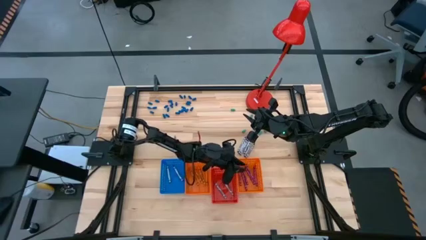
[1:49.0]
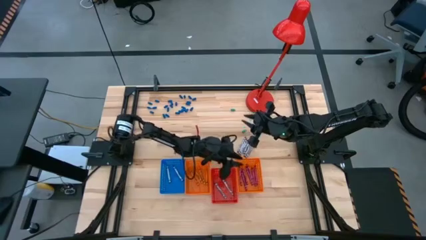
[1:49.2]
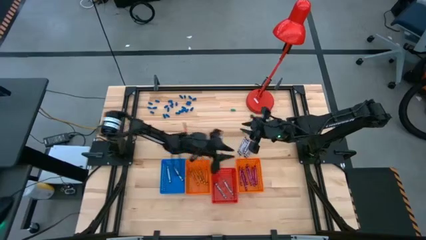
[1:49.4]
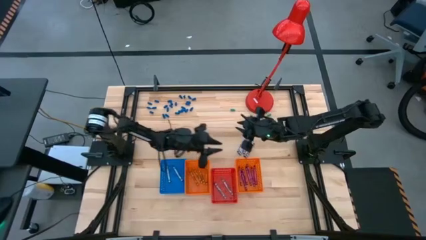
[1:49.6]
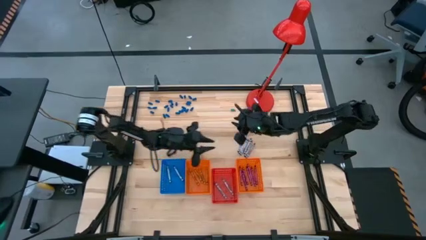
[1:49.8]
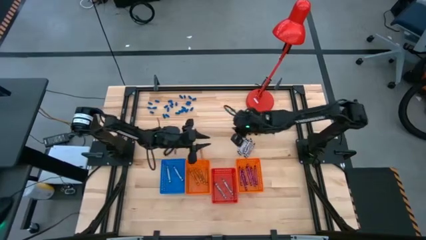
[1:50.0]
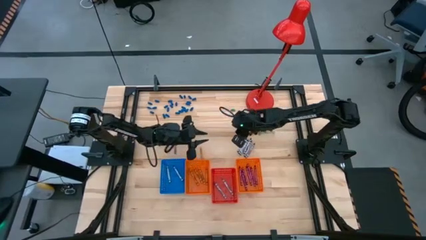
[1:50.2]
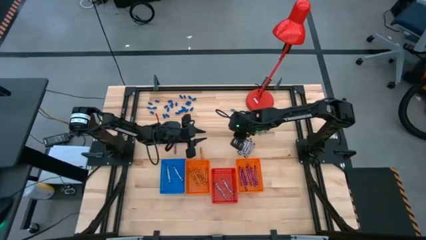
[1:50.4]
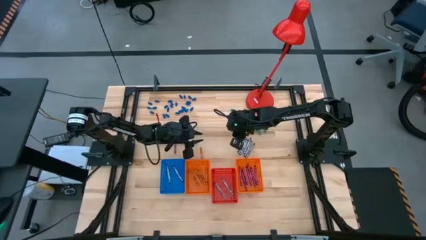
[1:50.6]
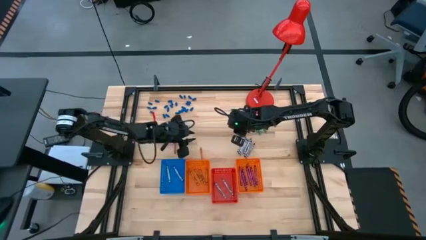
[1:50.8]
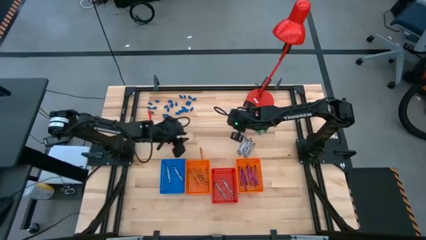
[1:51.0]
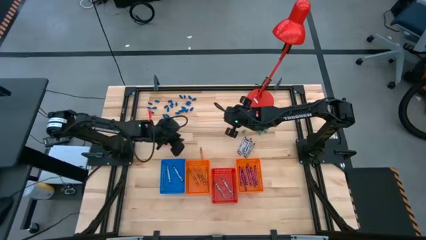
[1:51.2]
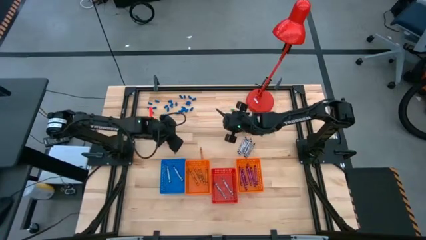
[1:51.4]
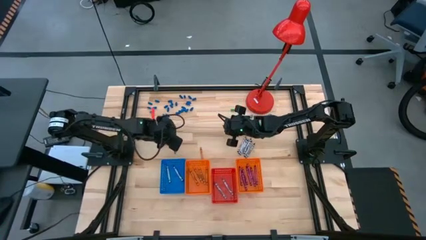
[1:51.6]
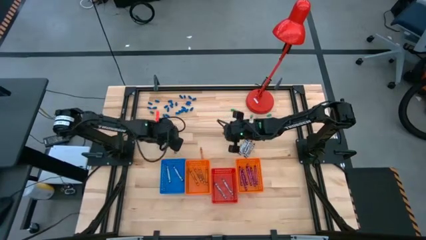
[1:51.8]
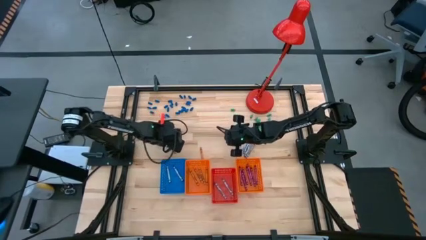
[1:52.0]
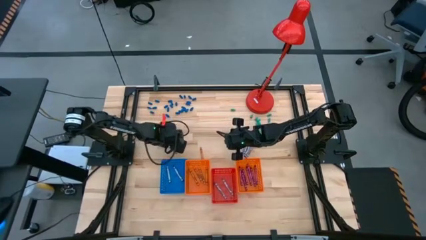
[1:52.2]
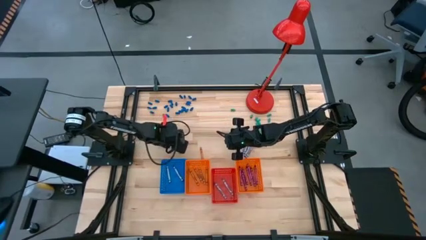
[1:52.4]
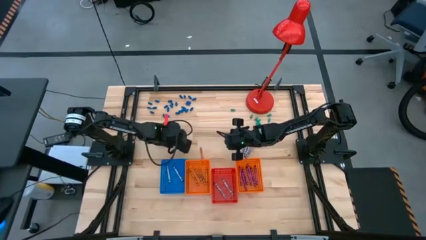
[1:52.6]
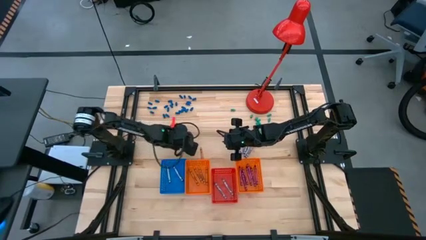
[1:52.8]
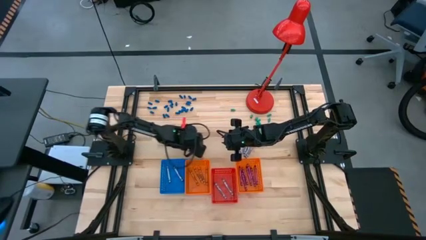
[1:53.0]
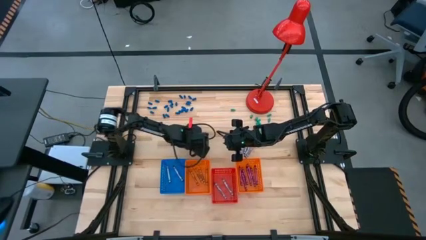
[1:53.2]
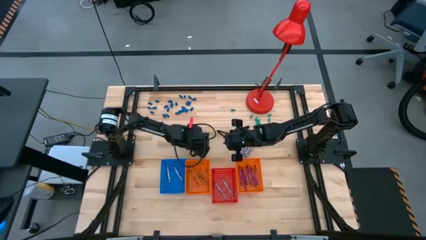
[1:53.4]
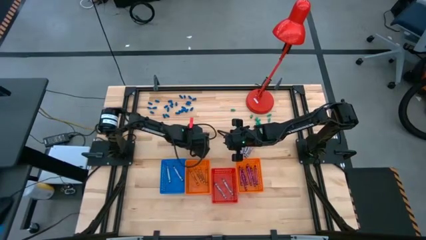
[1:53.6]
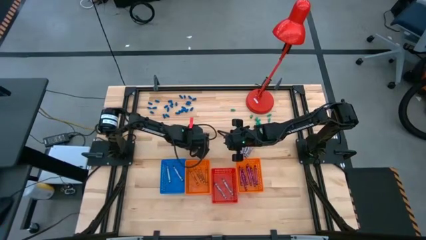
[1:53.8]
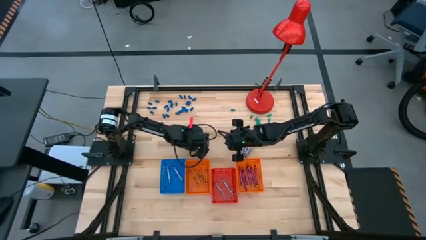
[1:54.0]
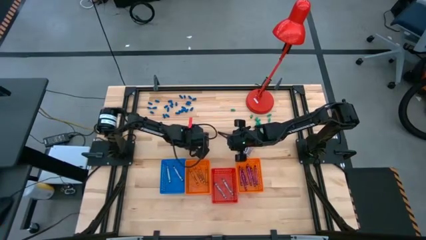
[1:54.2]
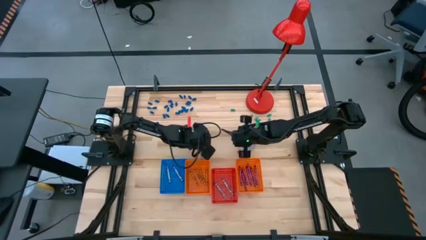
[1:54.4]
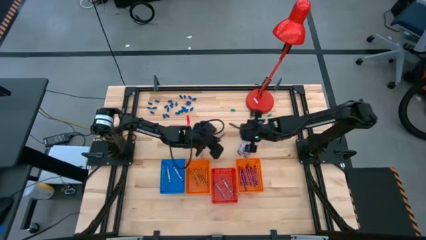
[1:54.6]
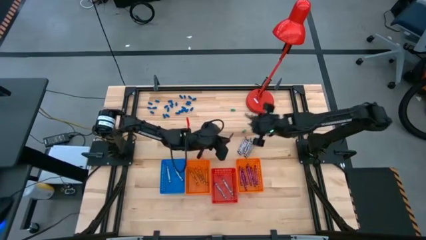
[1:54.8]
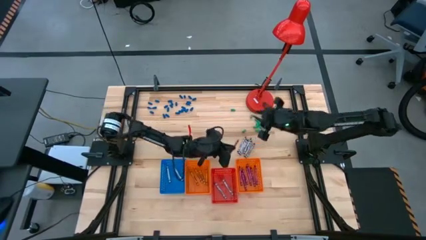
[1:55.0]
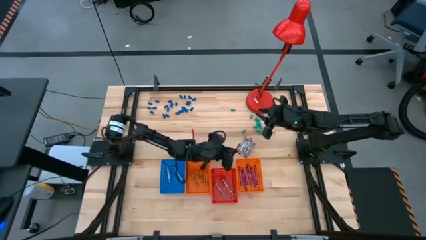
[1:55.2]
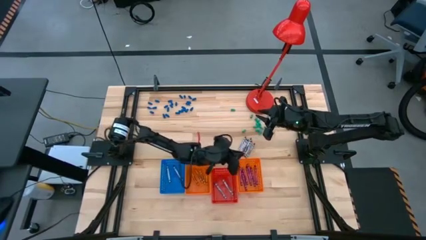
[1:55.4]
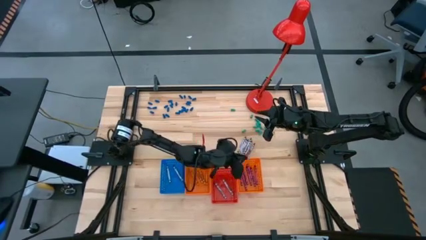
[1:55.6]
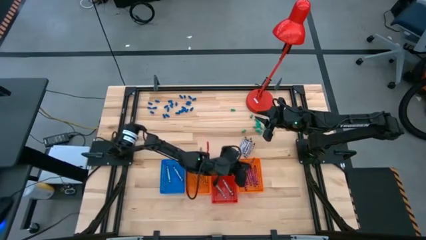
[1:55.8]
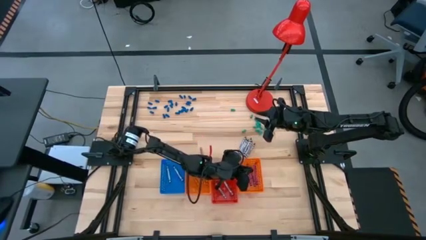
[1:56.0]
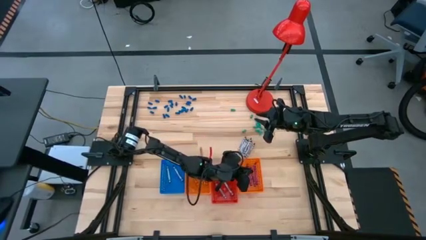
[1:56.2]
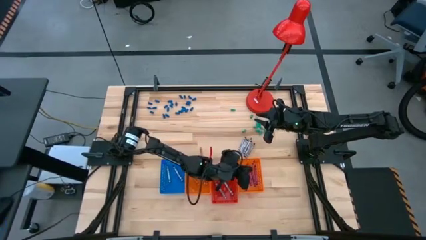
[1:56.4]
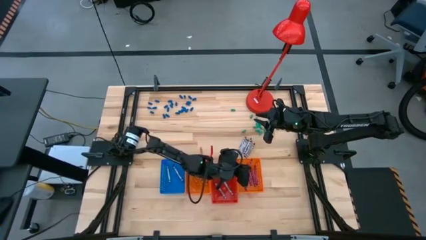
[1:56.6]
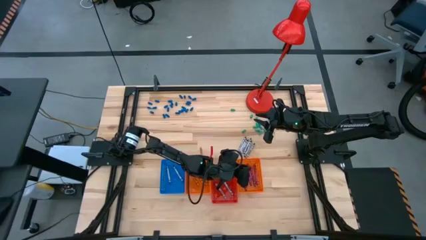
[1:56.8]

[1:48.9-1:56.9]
Task: Sort crayons
Put the red crayon into the right orange bin

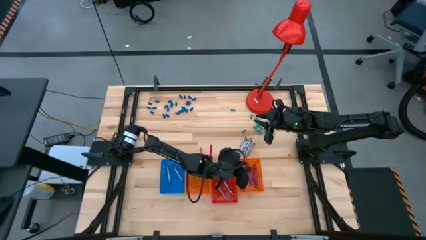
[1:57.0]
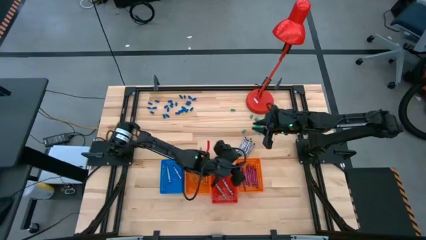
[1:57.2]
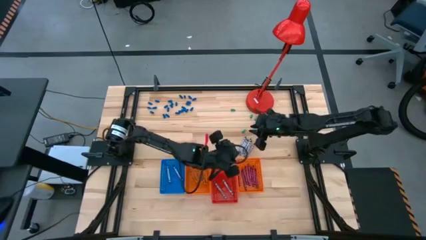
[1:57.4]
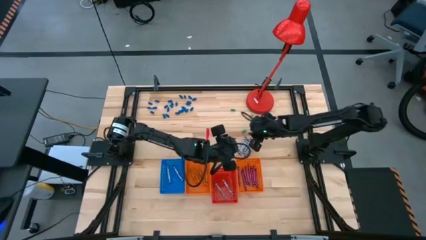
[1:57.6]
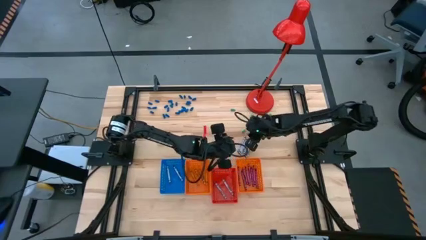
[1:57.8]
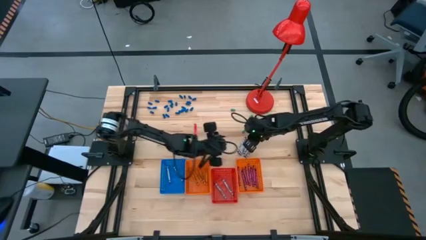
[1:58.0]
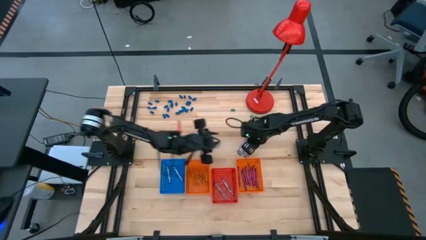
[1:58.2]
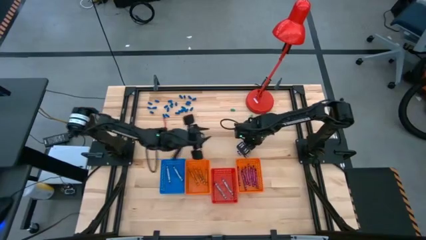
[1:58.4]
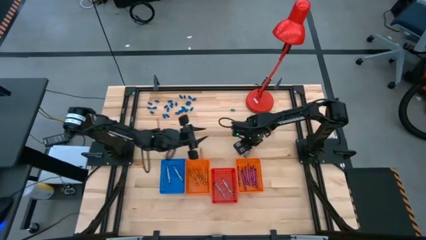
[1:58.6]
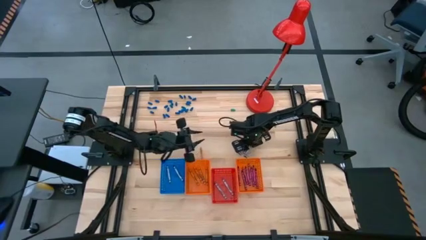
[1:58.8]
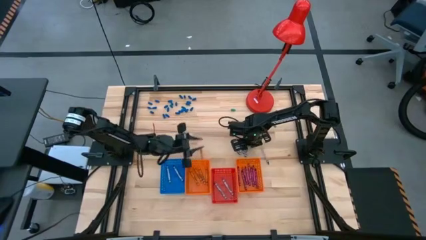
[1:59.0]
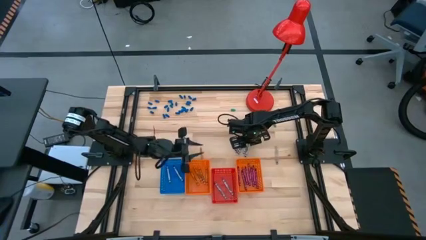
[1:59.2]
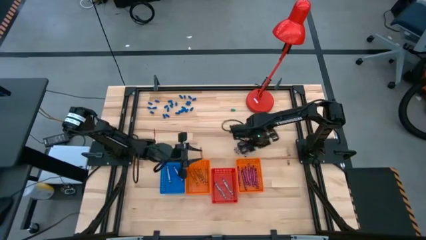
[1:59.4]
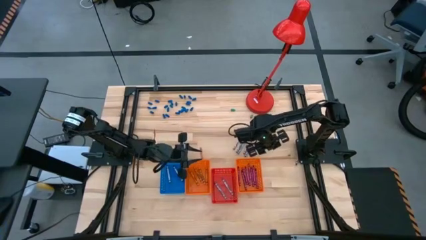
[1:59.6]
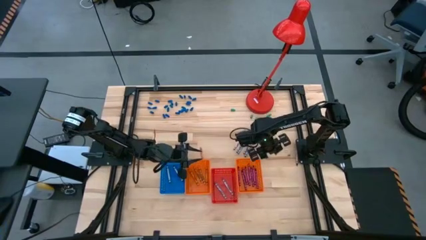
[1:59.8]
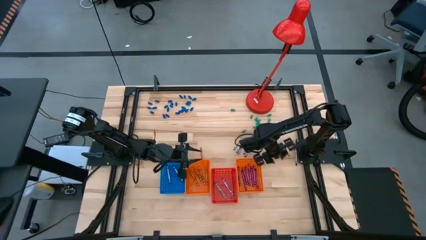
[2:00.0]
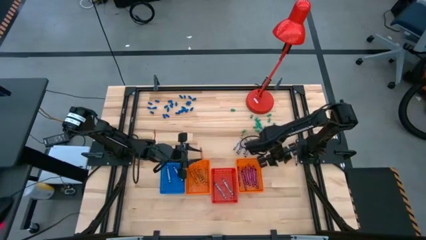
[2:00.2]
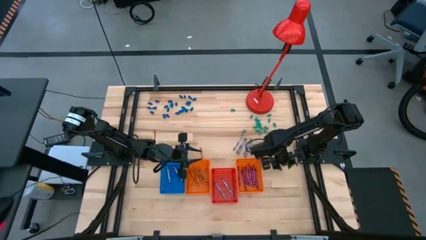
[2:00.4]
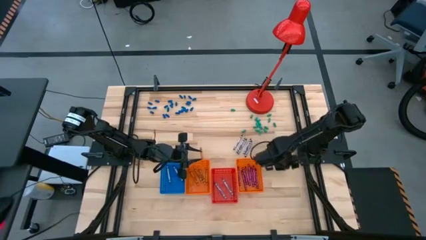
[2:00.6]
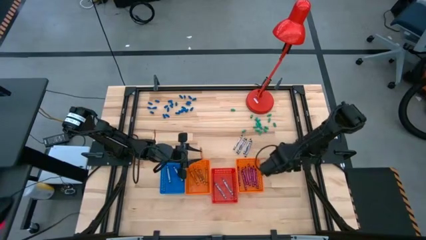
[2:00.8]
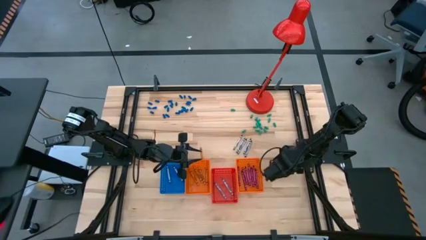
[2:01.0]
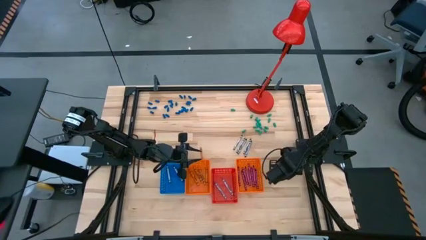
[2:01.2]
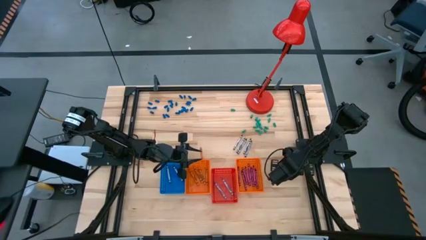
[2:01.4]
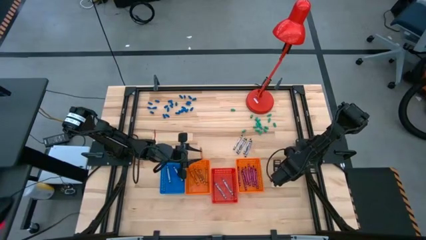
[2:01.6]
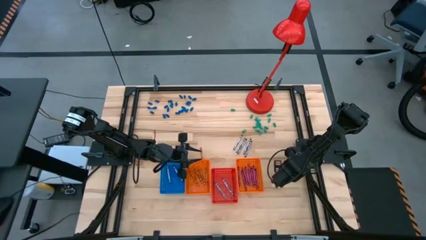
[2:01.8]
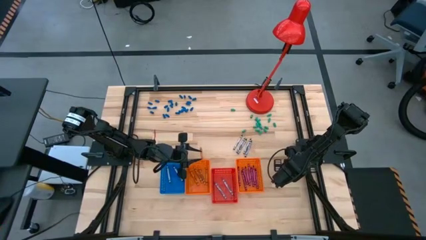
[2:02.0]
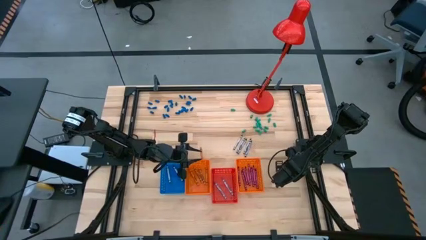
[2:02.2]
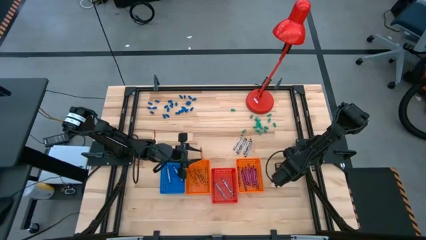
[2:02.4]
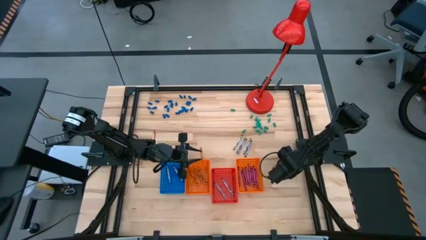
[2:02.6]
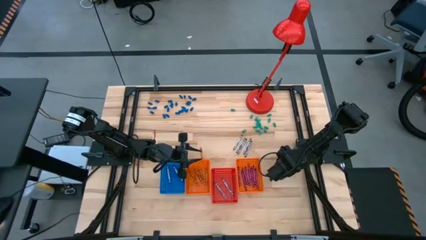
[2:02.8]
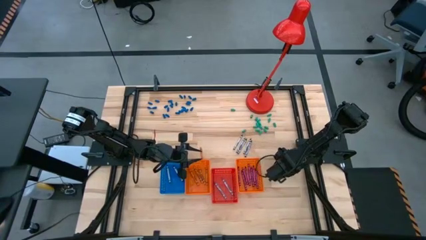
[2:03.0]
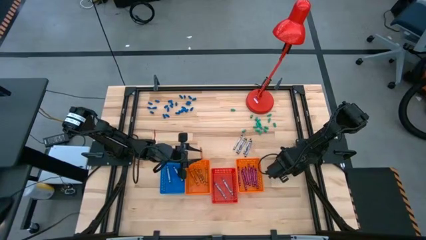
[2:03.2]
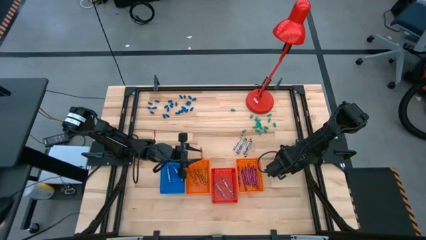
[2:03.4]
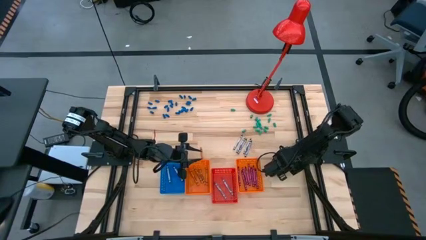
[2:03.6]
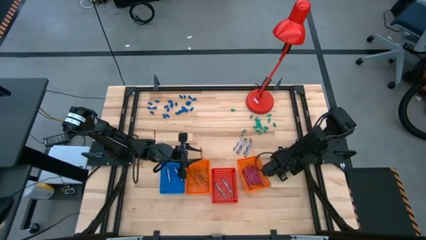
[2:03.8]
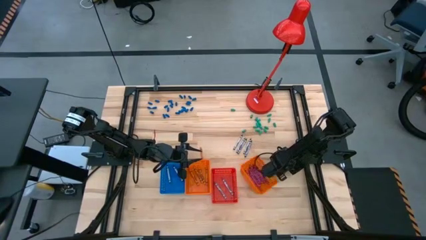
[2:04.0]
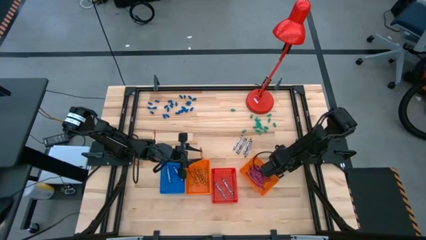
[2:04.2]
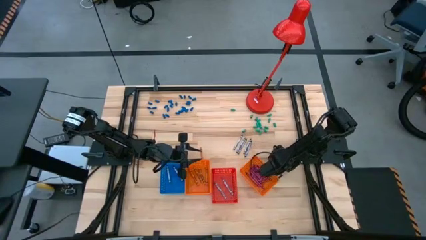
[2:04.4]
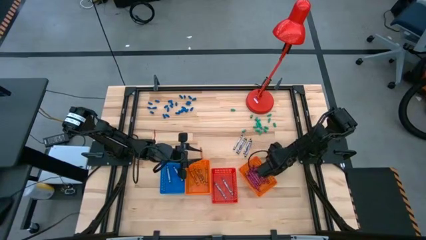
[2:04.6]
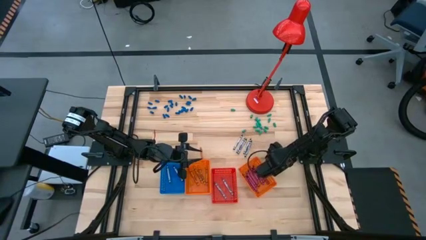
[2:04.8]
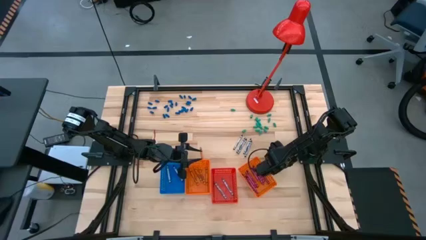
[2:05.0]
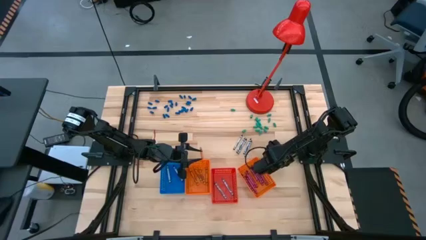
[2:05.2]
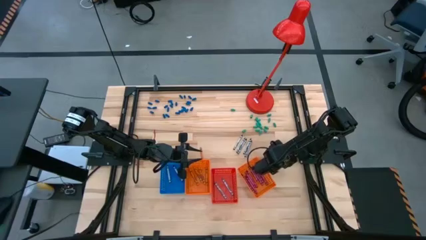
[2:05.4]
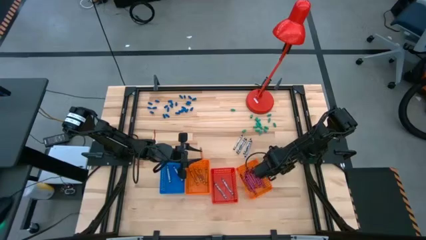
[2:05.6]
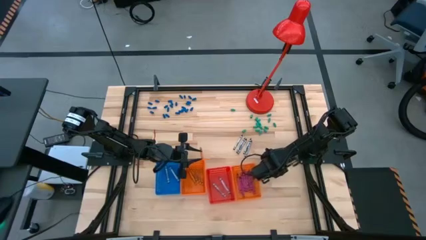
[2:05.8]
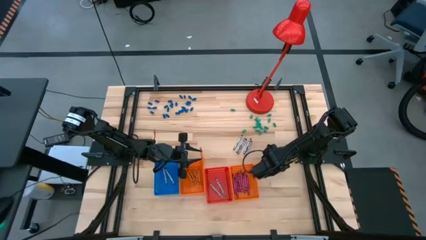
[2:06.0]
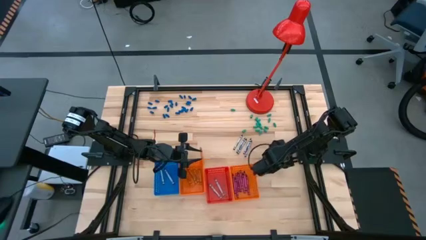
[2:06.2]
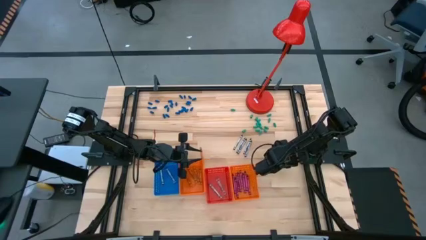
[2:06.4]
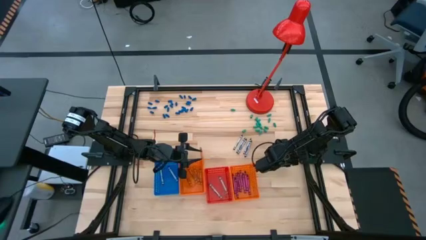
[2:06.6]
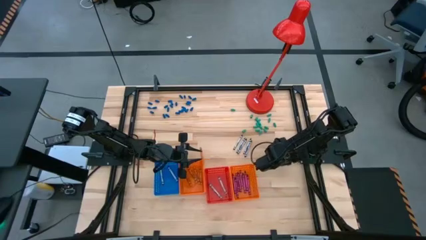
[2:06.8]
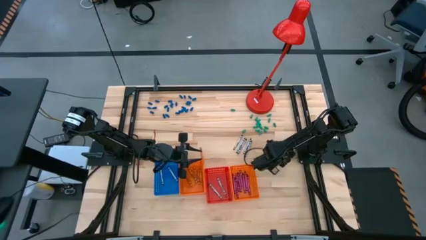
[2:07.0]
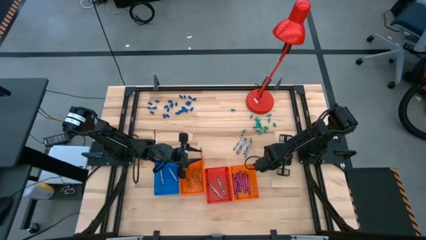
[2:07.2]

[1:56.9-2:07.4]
Put the black crayon into the blue bin
